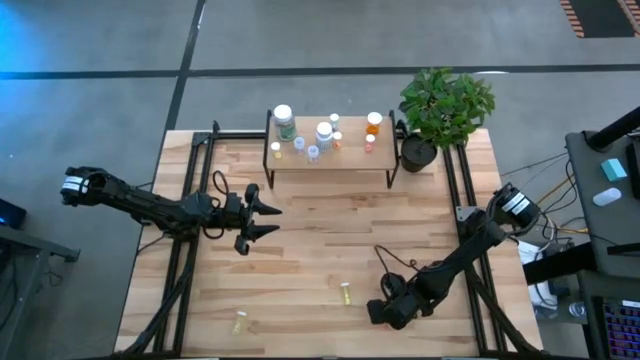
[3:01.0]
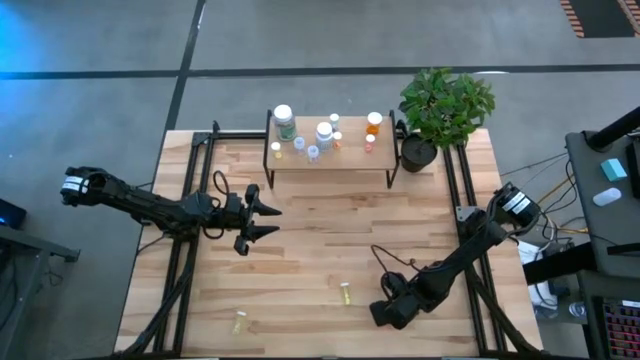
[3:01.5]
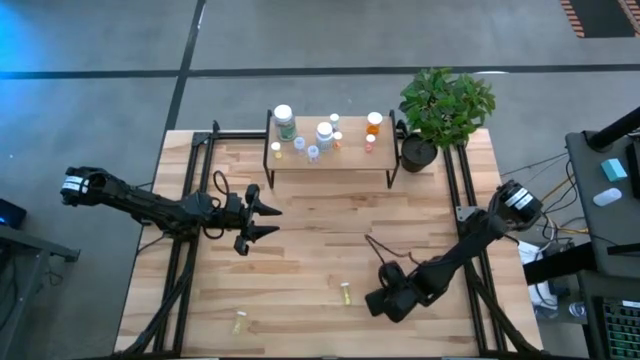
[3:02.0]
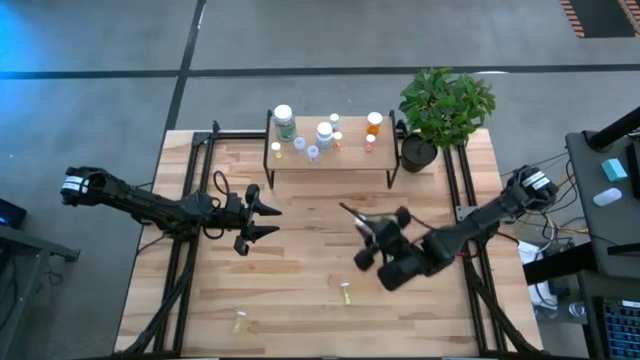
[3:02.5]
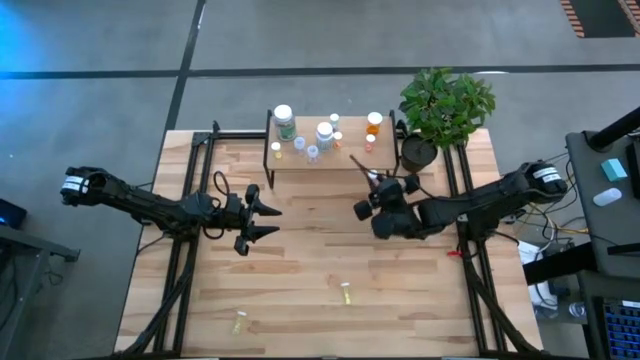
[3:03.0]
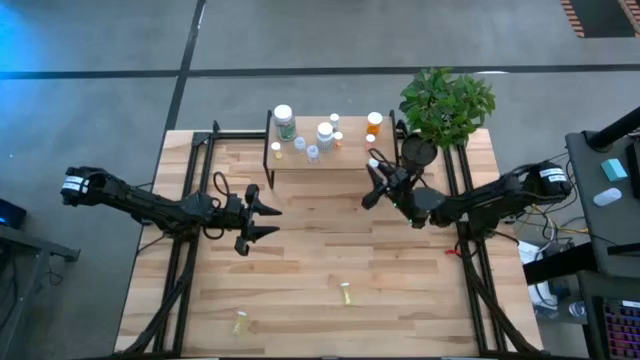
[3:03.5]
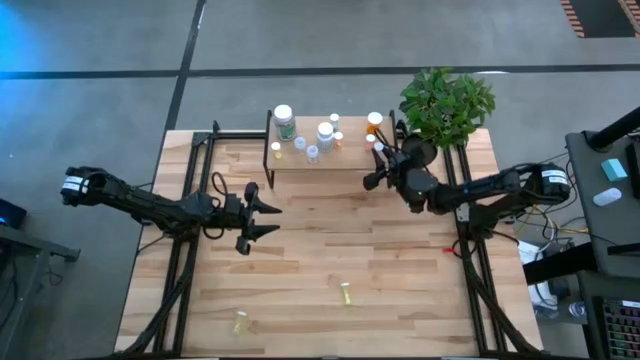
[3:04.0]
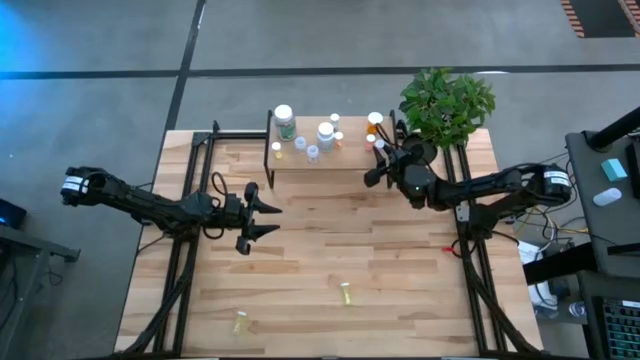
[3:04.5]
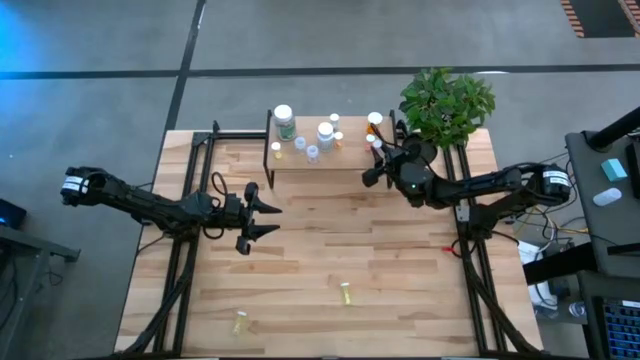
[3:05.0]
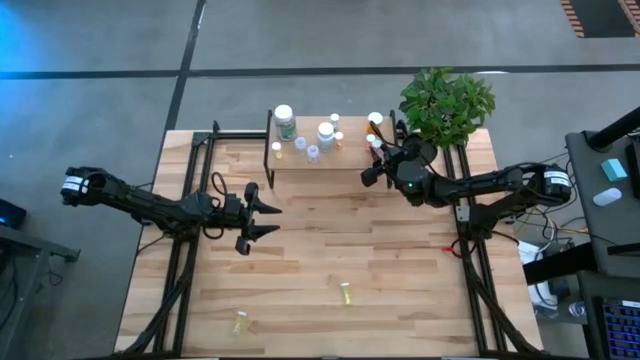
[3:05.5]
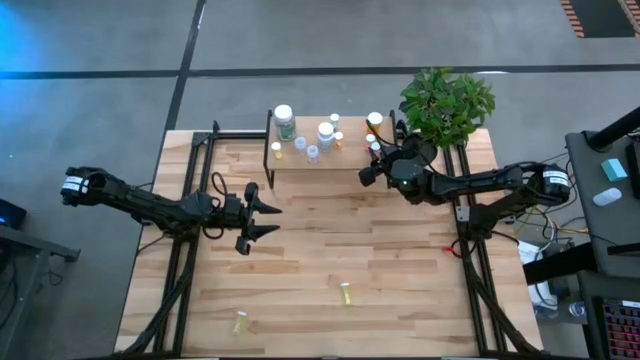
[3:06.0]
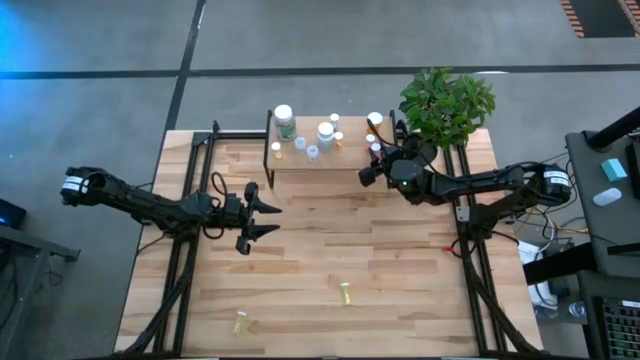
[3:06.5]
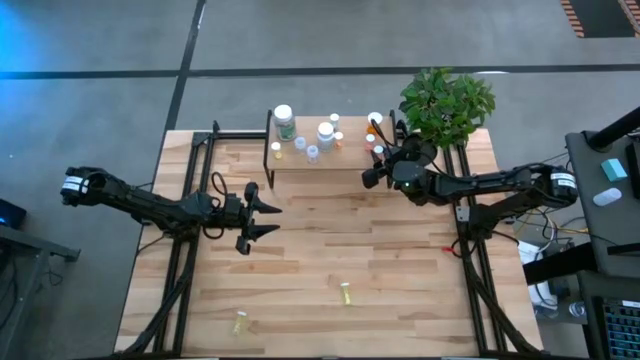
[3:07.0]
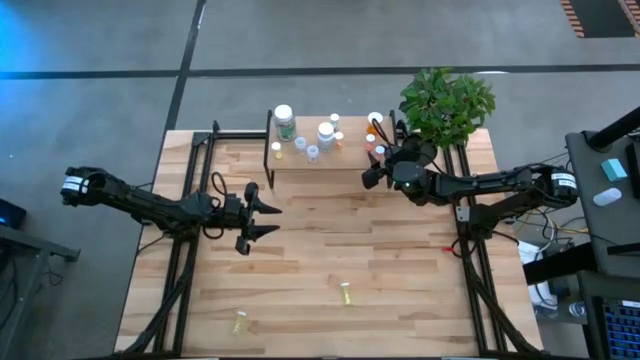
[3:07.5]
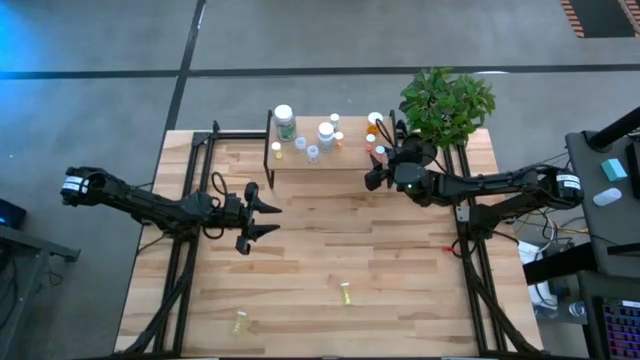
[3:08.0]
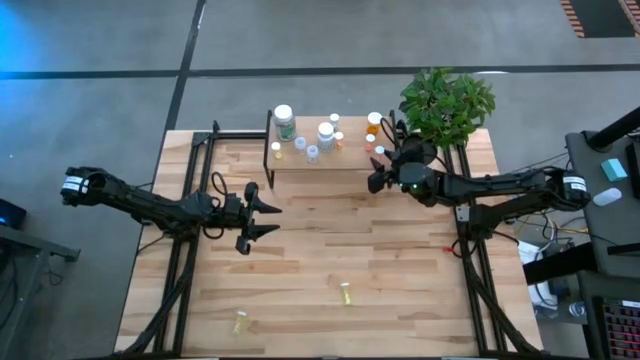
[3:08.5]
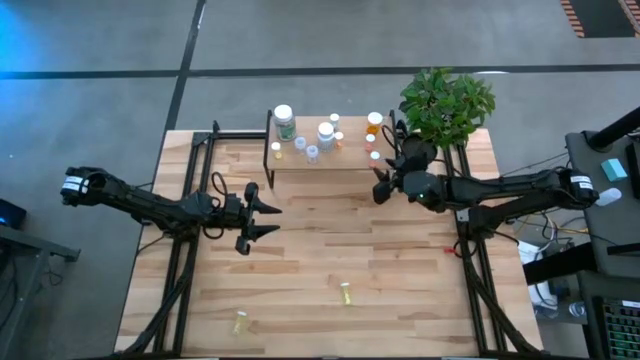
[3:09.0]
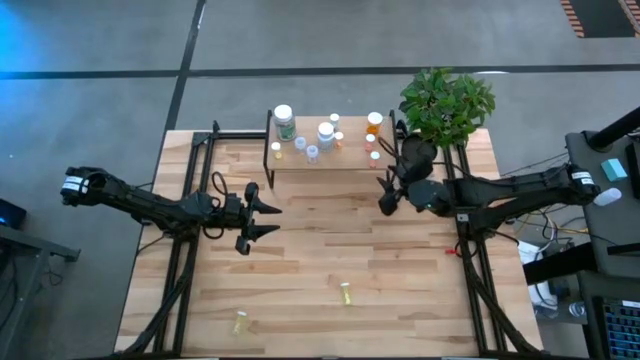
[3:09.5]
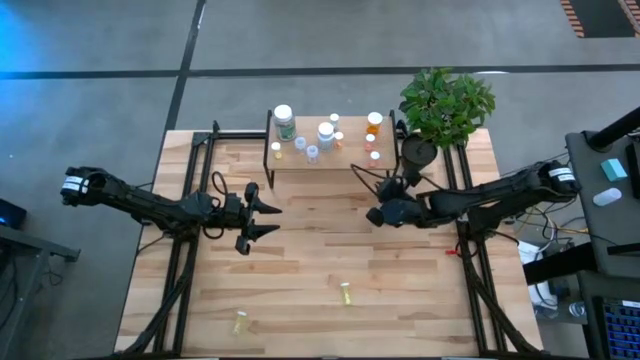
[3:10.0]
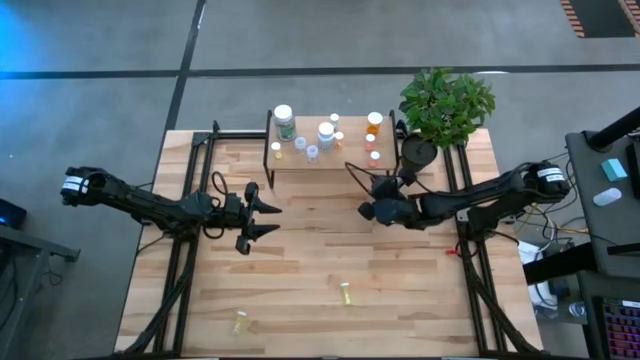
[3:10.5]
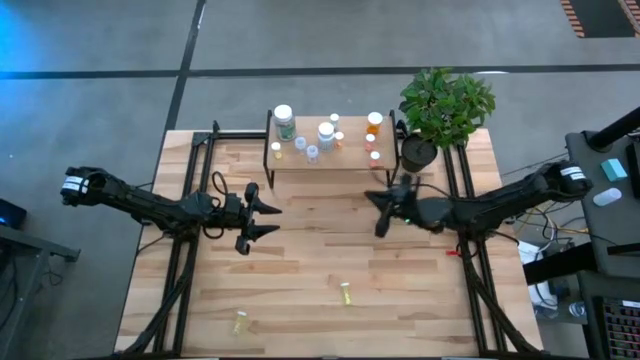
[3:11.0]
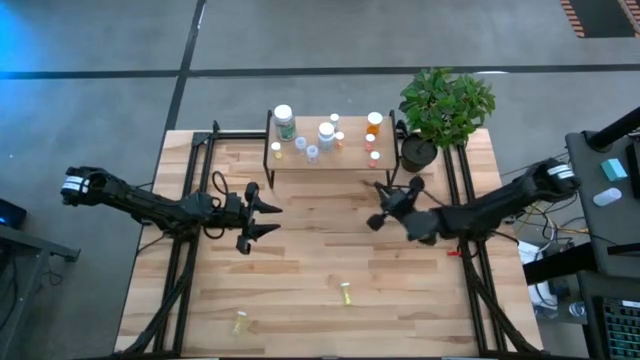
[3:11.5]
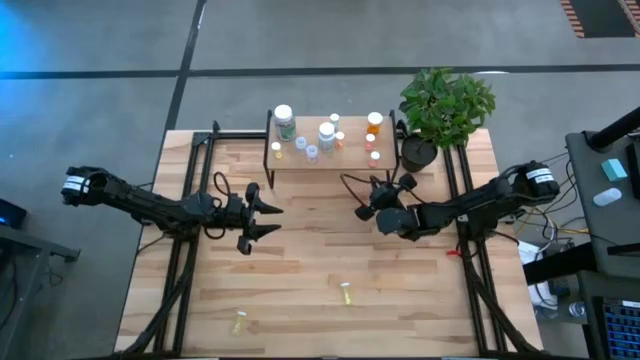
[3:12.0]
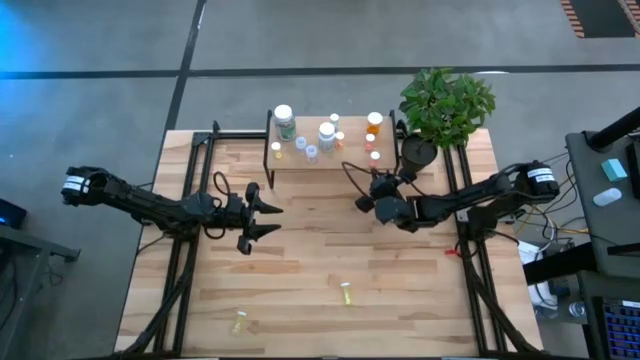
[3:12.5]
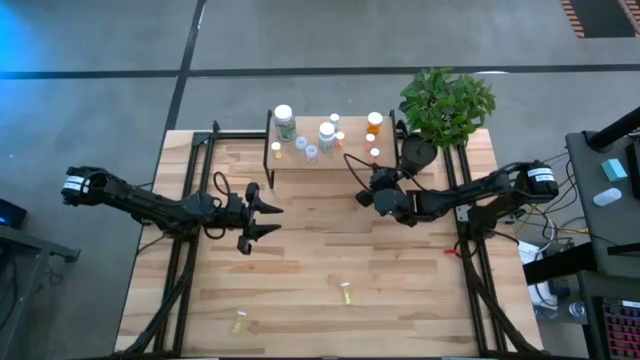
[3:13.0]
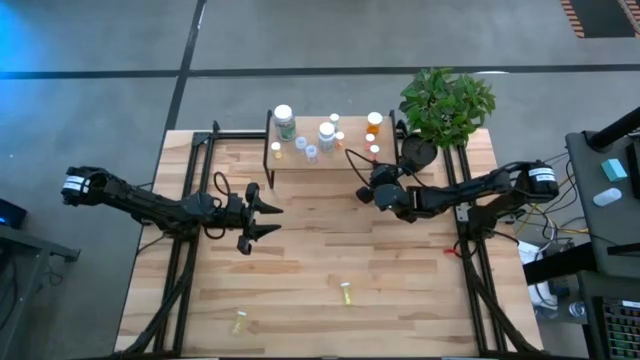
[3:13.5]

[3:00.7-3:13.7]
Task: Pick and place medicine bottles onto shelf by color
Put the pink pill bottle on the shelf

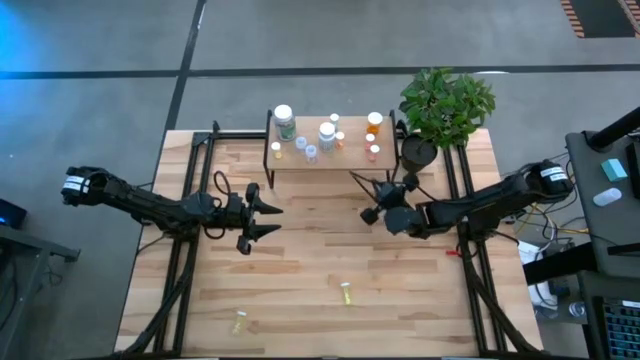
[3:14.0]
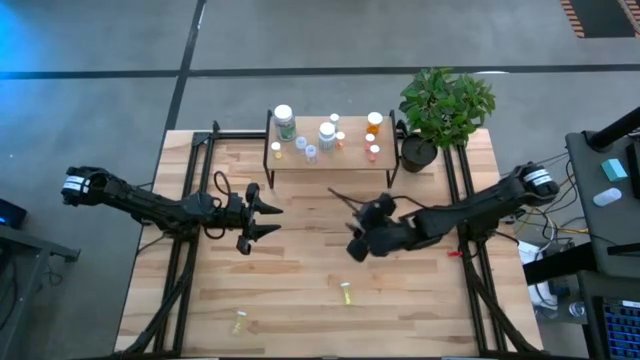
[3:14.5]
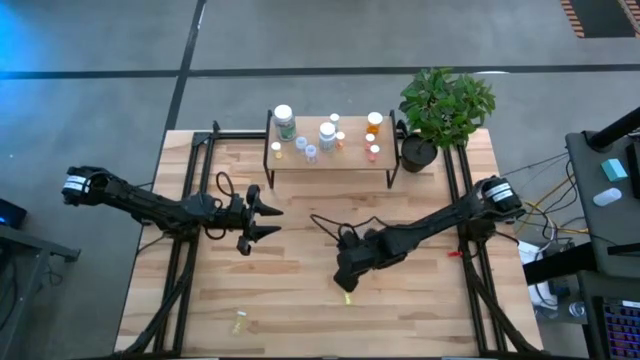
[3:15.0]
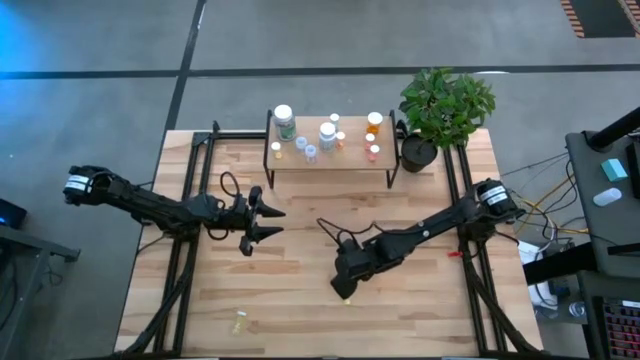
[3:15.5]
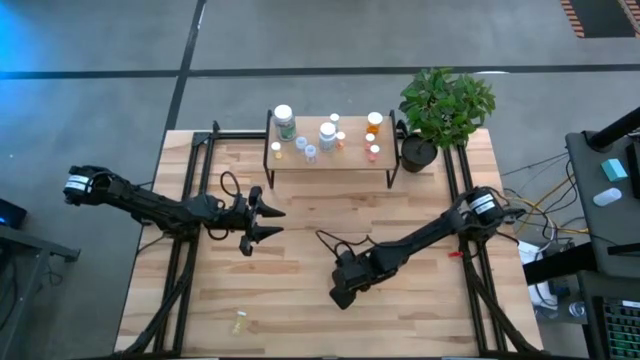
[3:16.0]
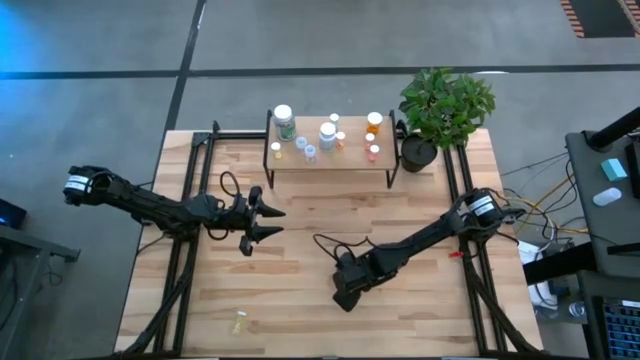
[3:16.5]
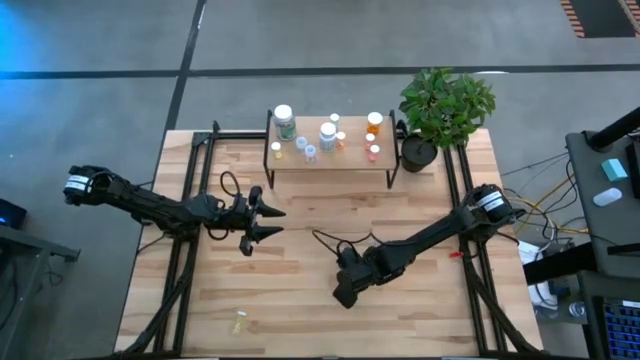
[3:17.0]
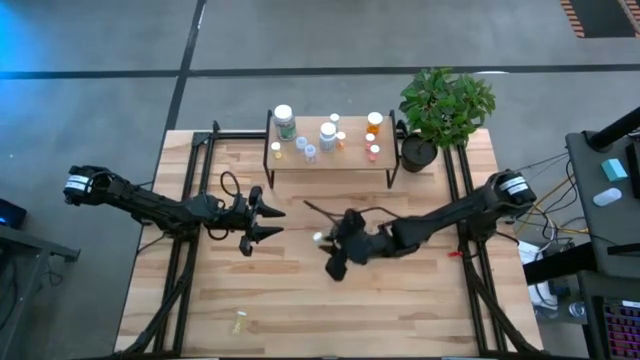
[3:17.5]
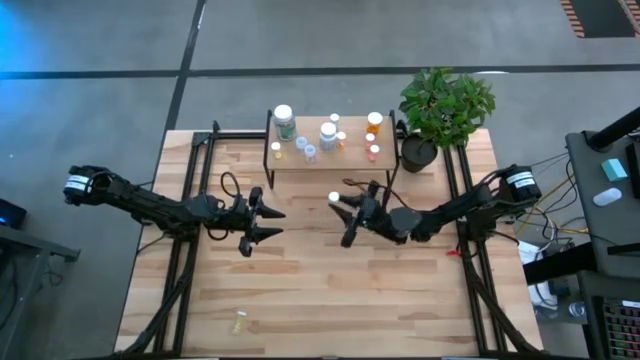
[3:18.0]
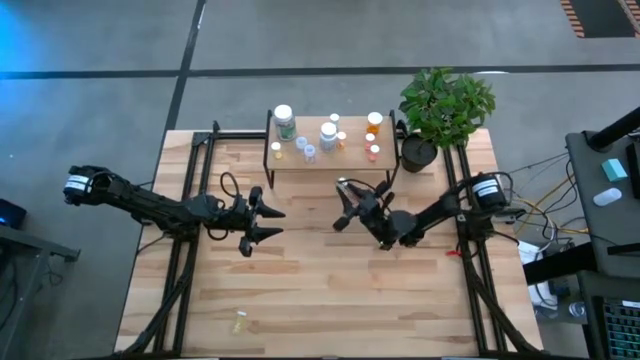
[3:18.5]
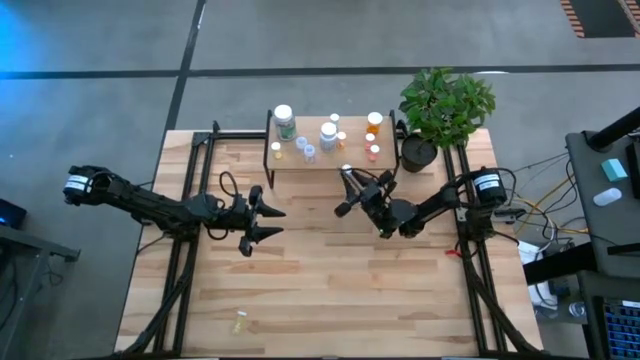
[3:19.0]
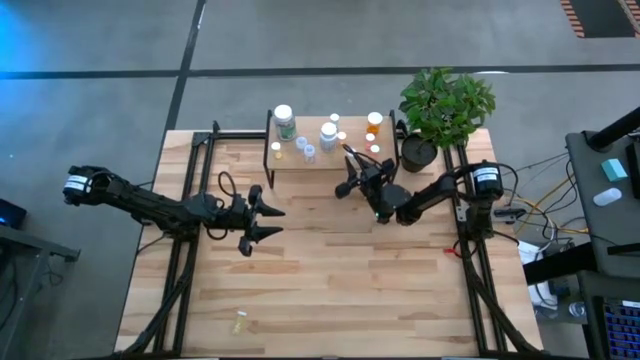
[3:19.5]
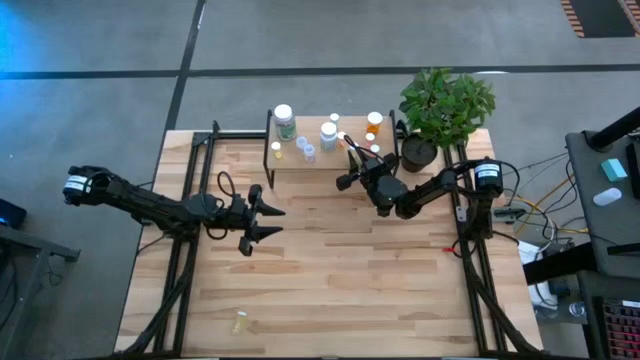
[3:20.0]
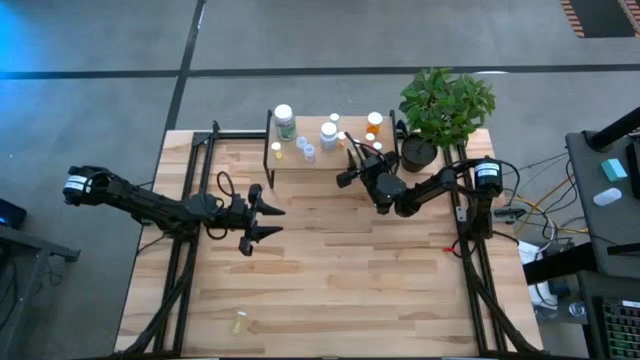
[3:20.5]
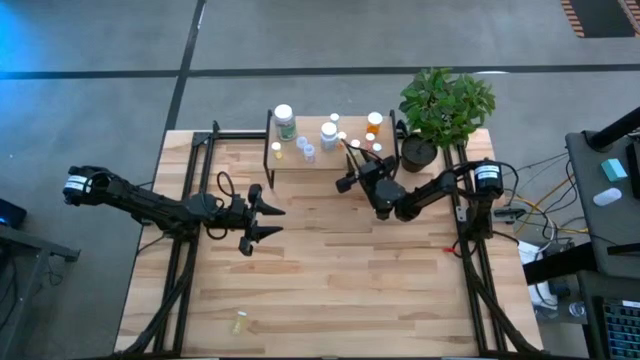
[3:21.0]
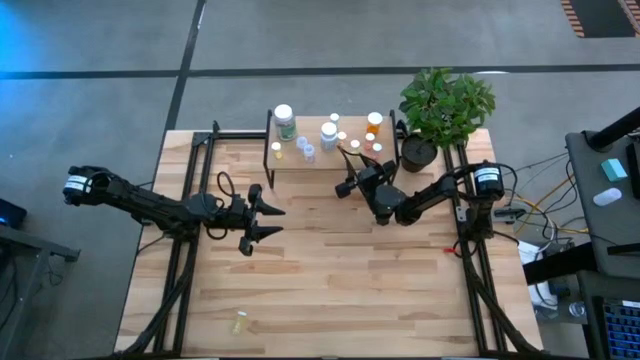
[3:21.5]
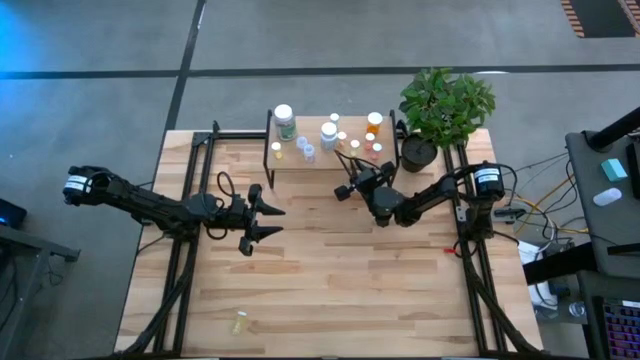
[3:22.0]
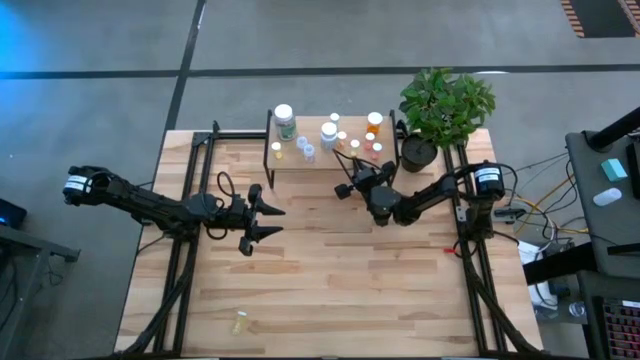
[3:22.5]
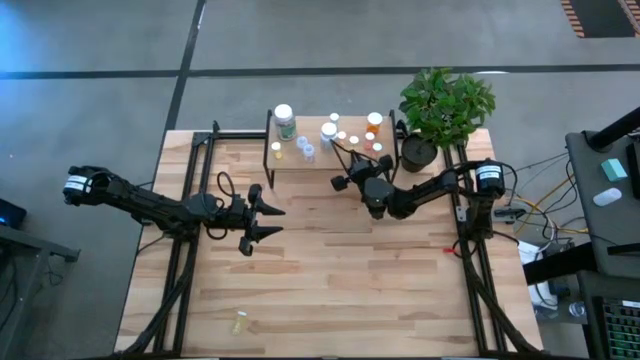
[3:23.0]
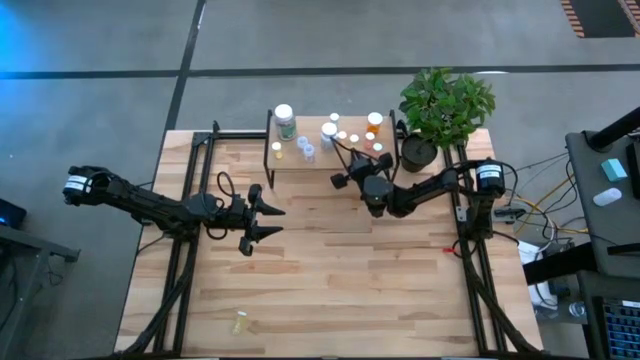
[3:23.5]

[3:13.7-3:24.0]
Put the yellow pill bottle on the shelf
